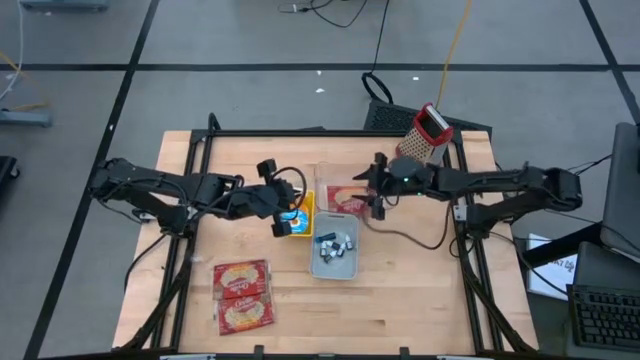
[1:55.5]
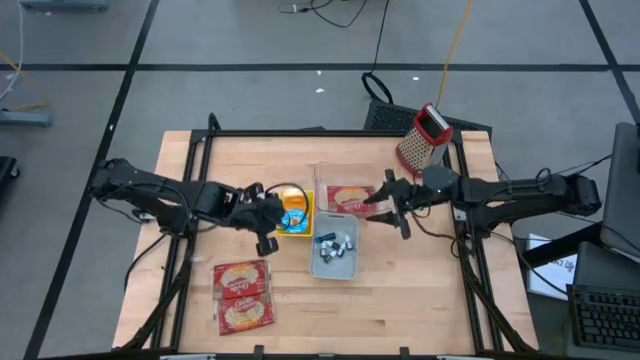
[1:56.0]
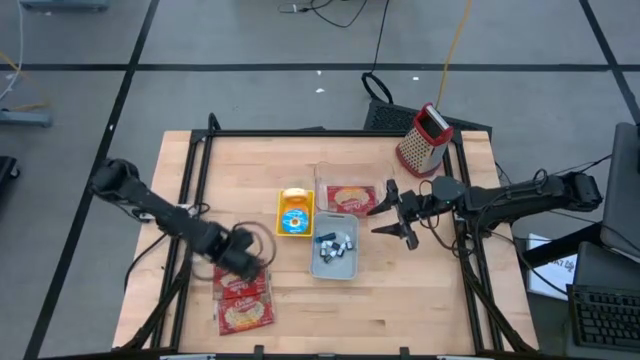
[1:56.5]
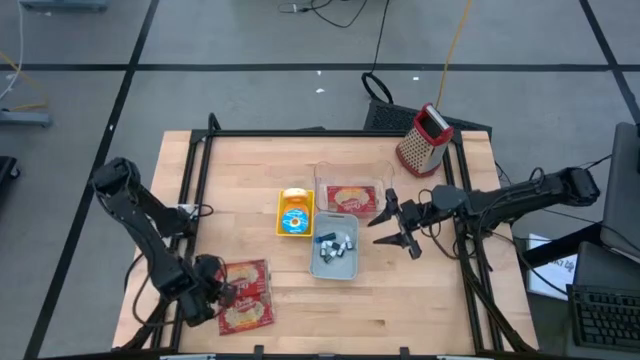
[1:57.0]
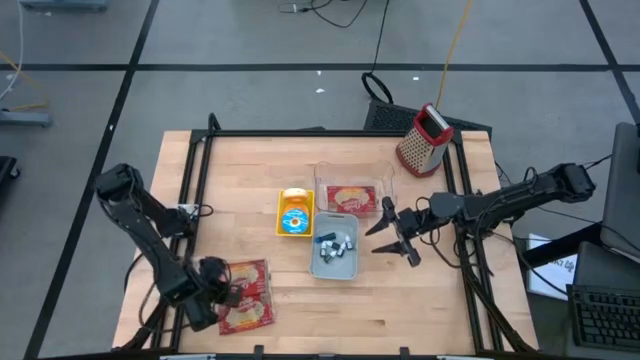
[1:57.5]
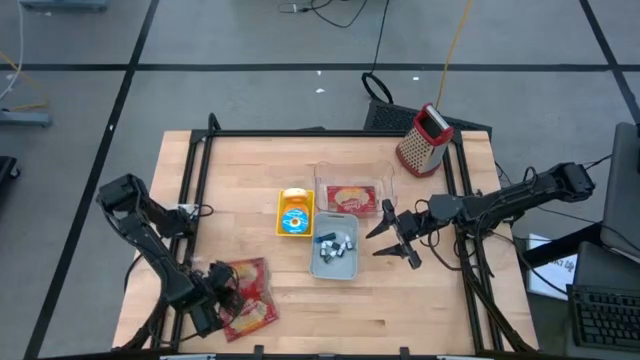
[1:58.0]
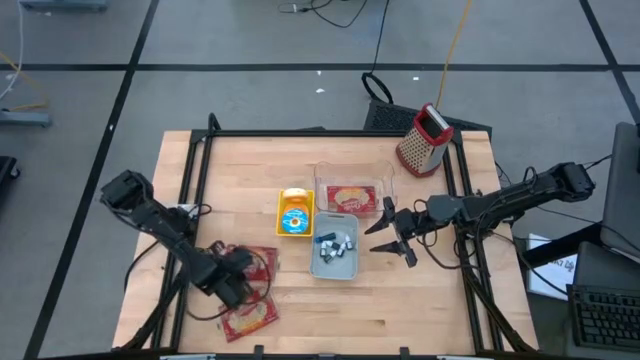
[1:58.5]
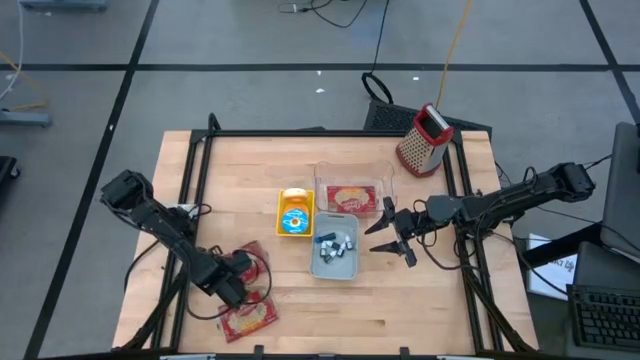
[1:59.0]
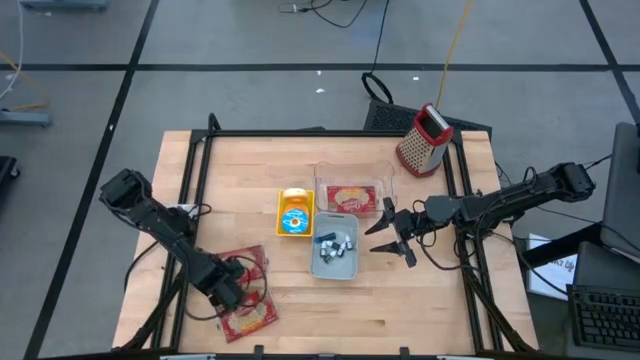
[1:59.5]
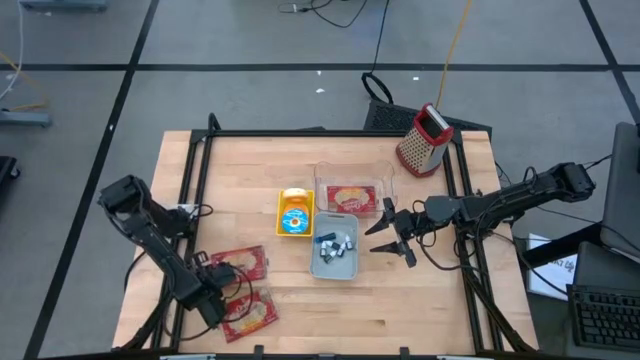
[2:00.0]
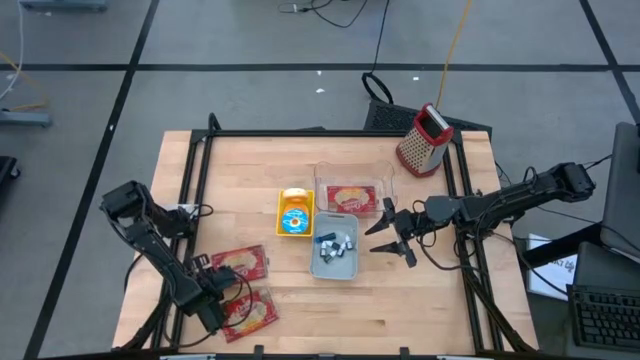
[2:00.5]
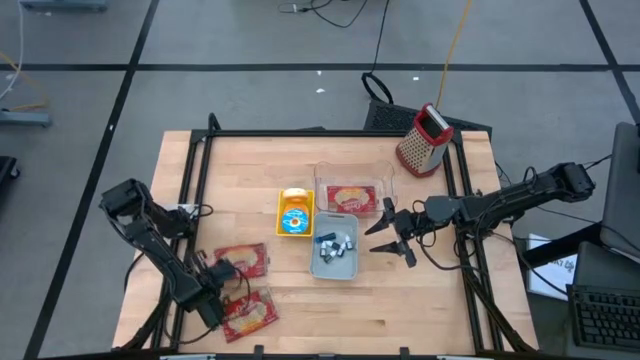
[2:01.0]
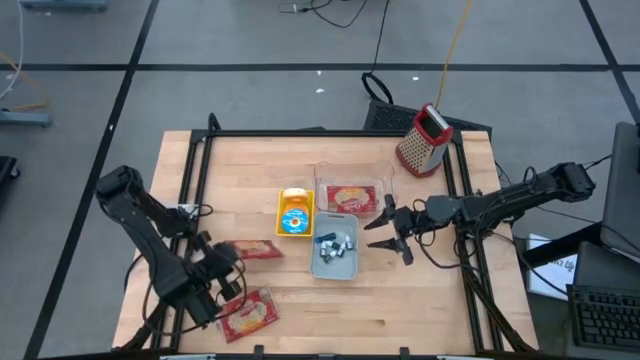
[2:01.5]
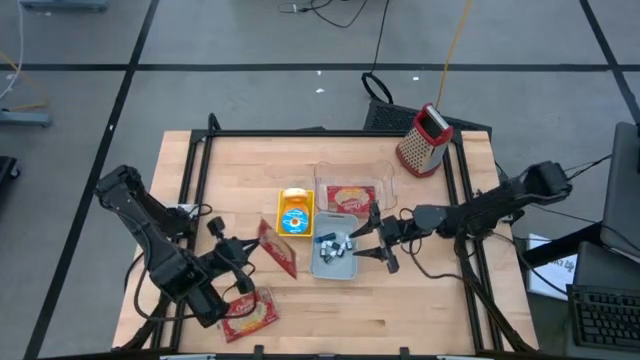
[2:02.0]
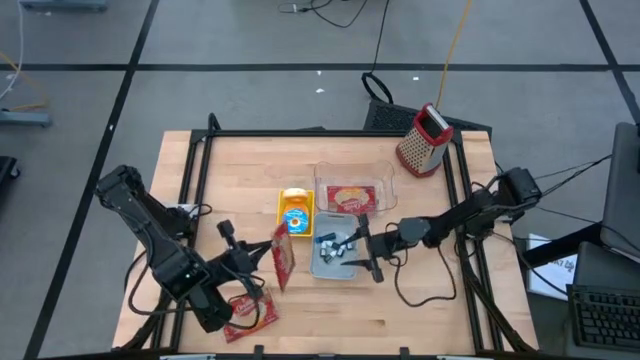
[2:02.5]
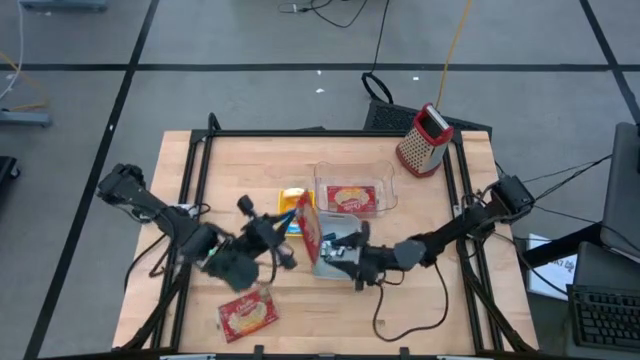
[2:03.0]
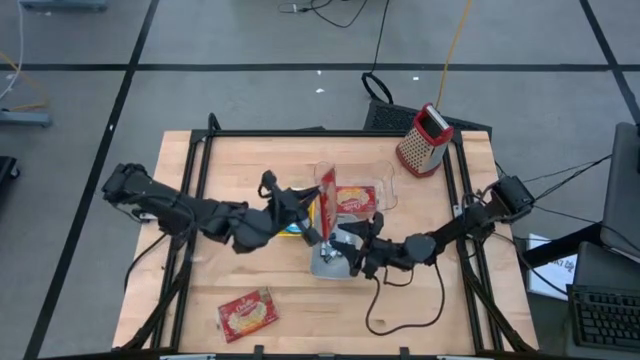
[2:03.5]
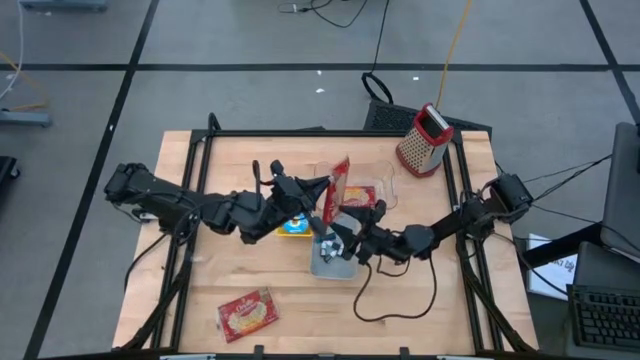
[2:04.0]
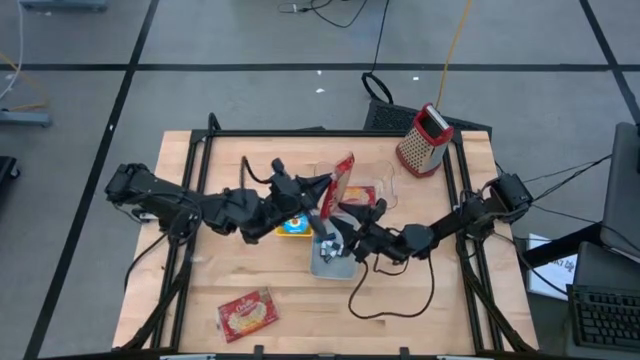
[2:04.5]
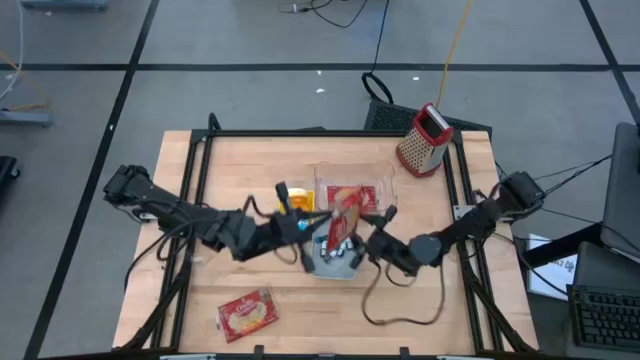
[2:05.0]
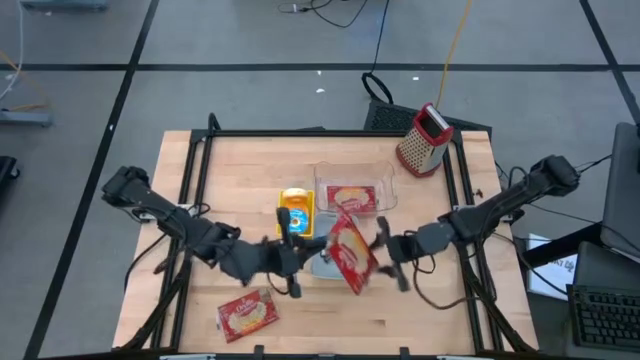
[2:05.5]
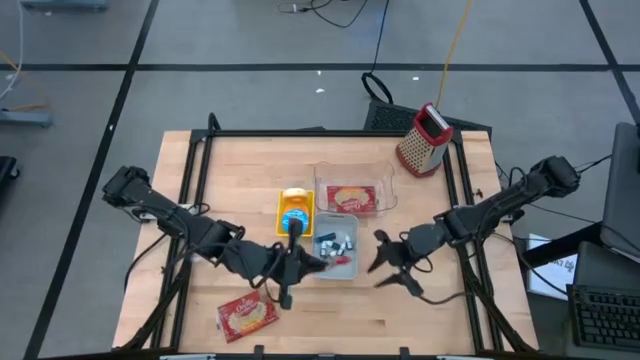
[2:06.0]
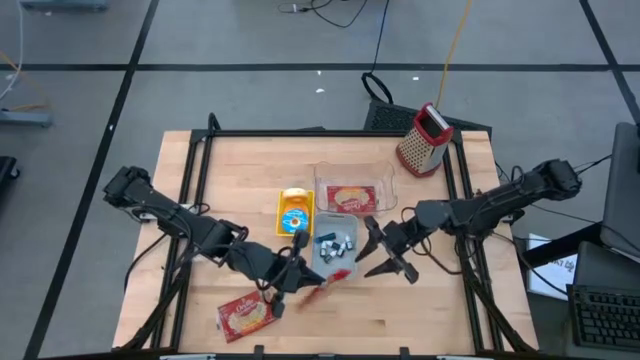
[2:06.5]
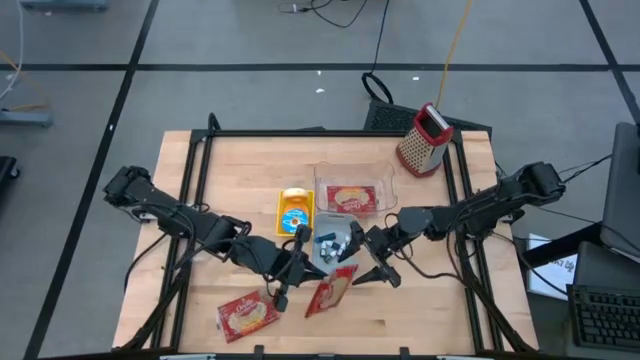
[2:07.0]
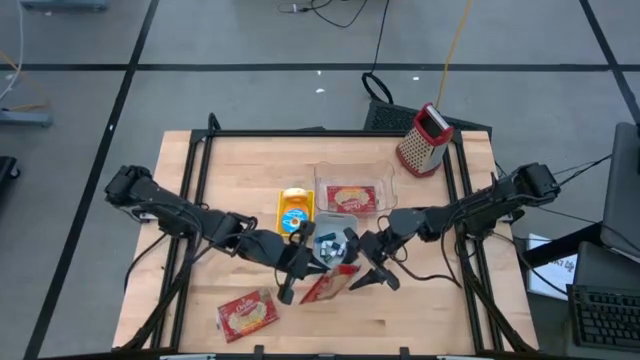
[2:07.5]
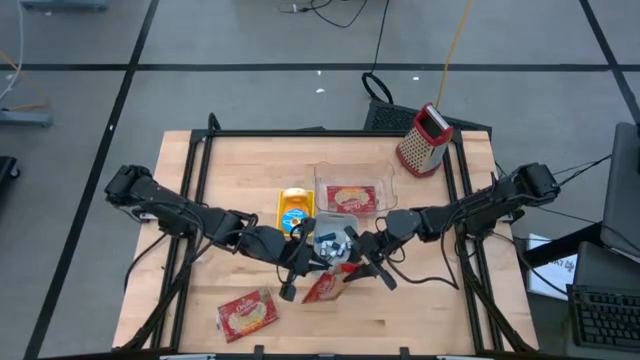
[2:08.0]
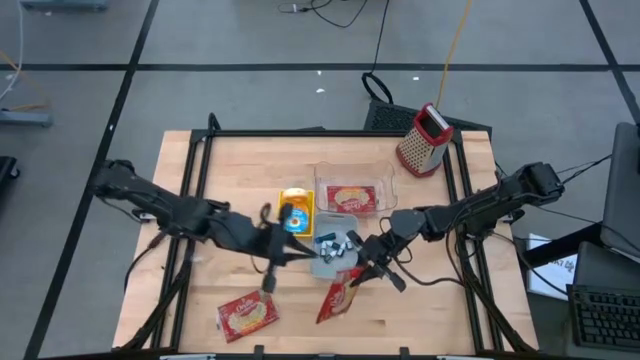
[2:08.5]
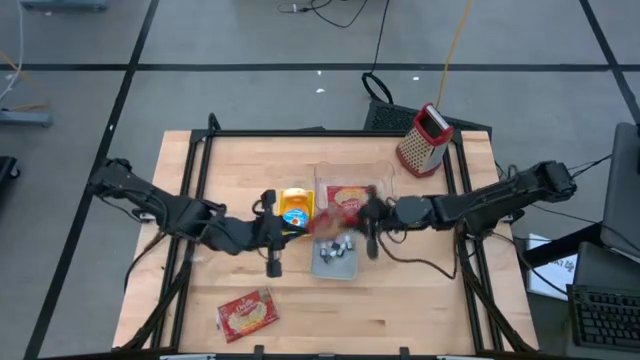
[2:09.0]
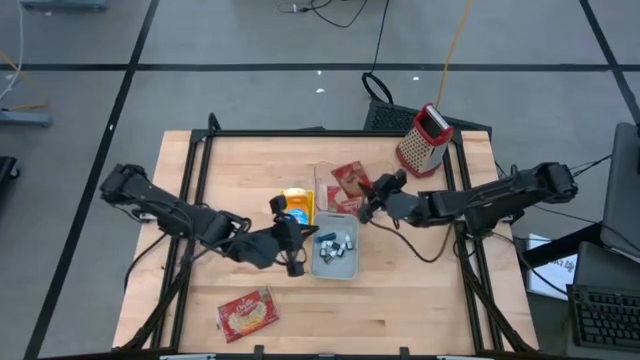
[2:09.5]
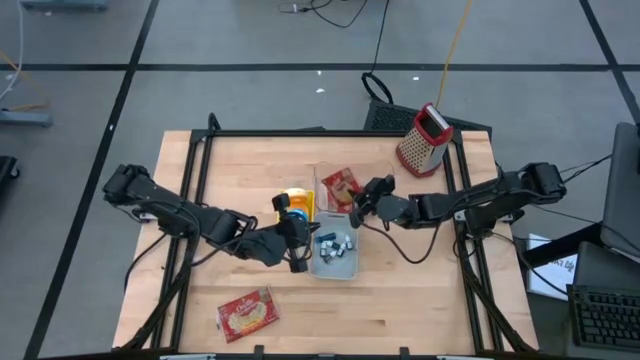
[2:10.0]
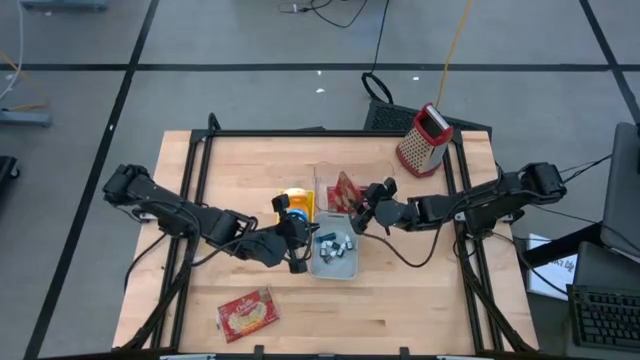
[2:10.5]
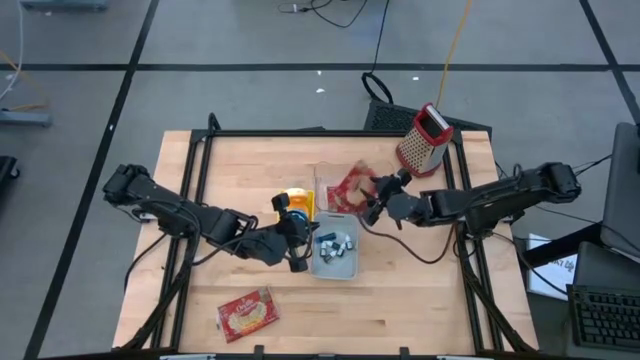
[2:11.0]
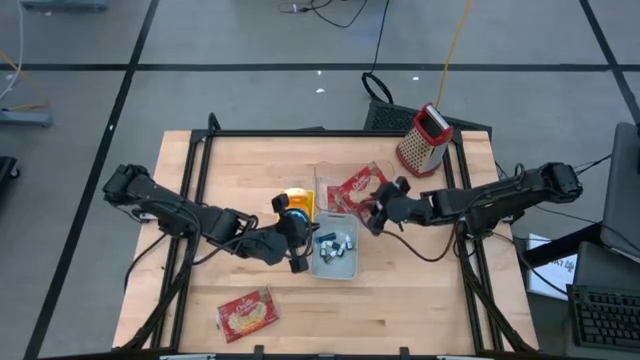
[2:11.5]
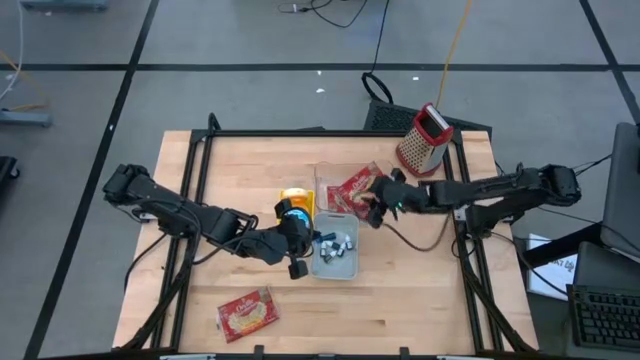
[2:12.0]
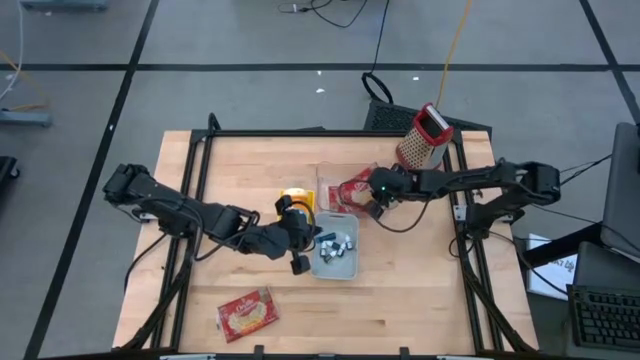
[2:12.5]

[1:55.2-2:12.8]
Put the top red popcorn bag into the transparent bin
